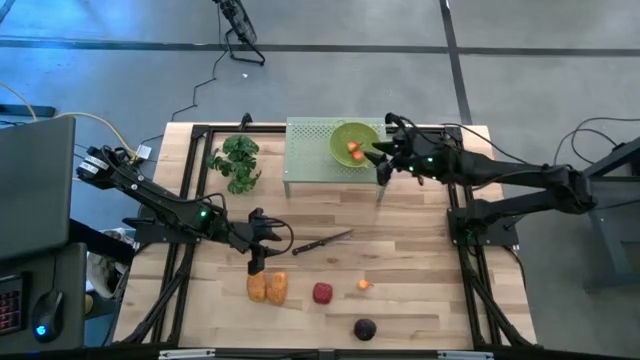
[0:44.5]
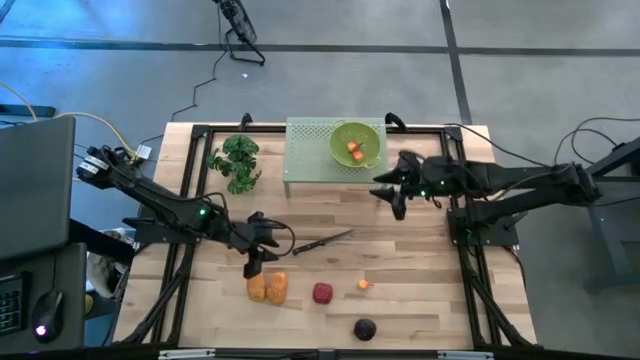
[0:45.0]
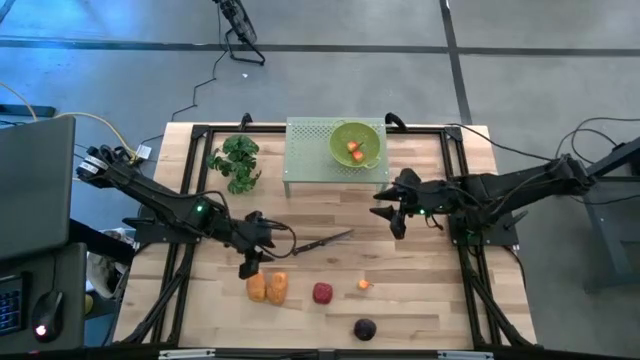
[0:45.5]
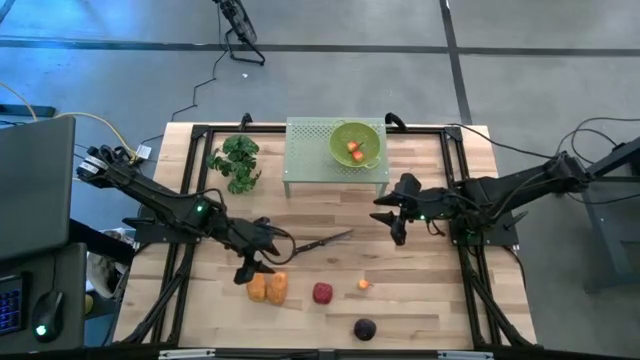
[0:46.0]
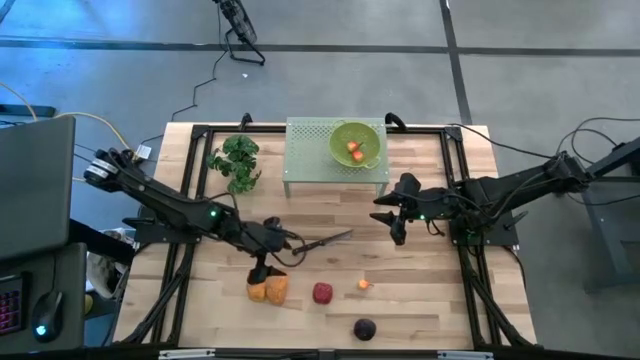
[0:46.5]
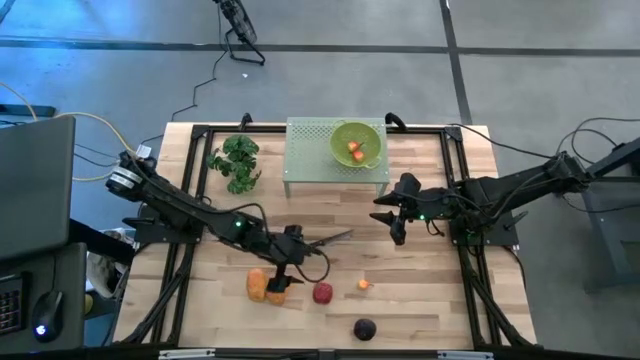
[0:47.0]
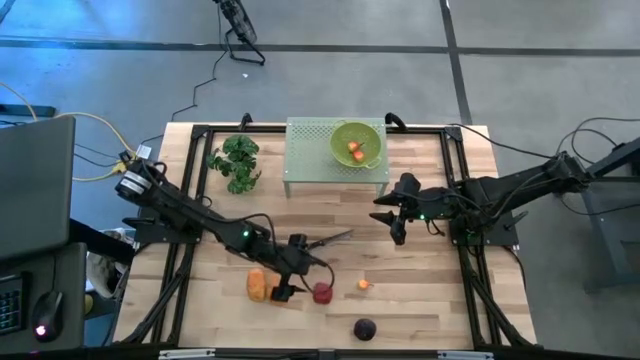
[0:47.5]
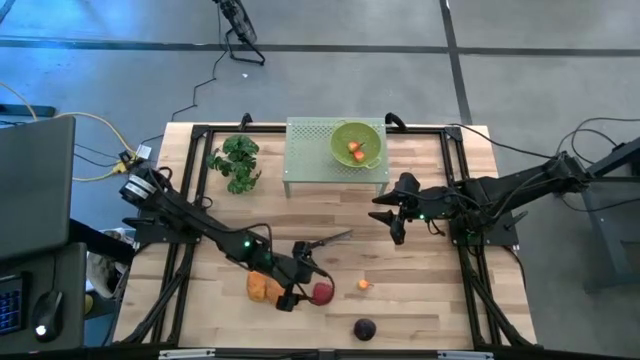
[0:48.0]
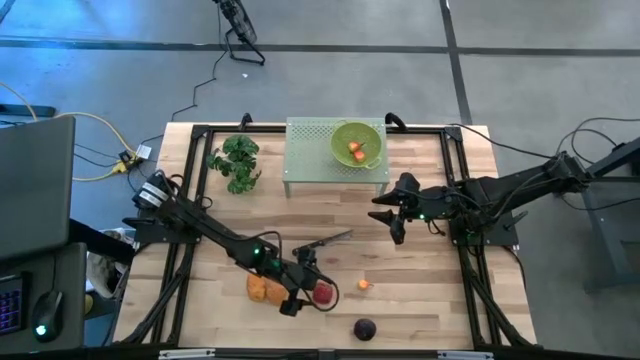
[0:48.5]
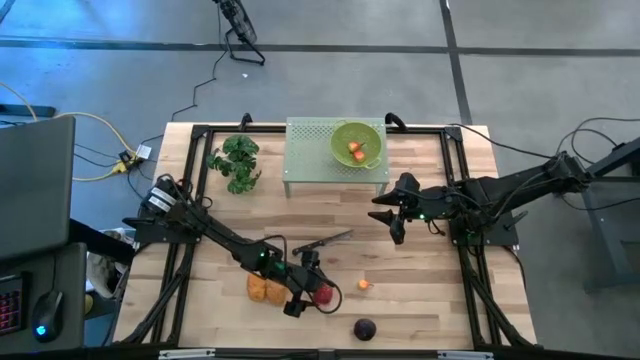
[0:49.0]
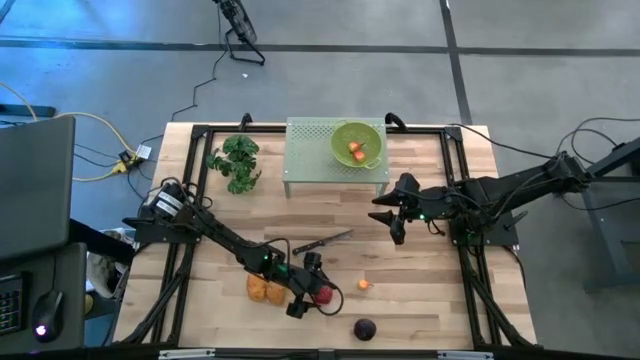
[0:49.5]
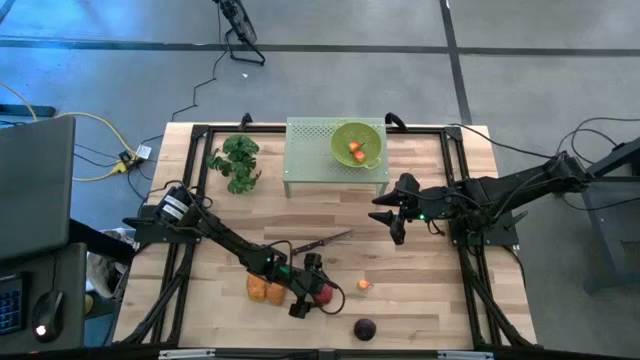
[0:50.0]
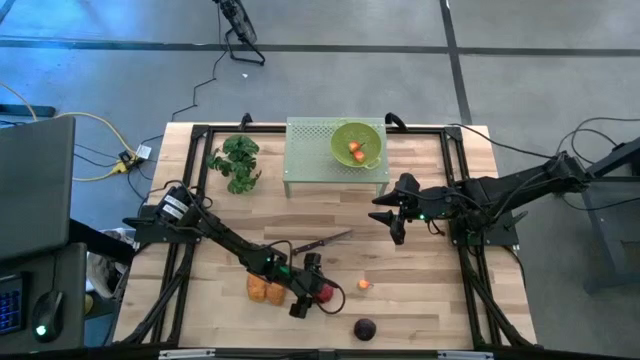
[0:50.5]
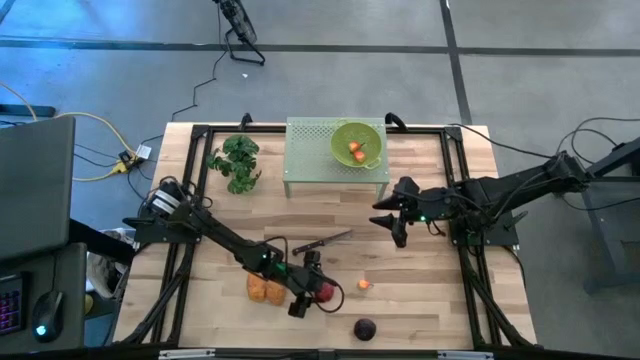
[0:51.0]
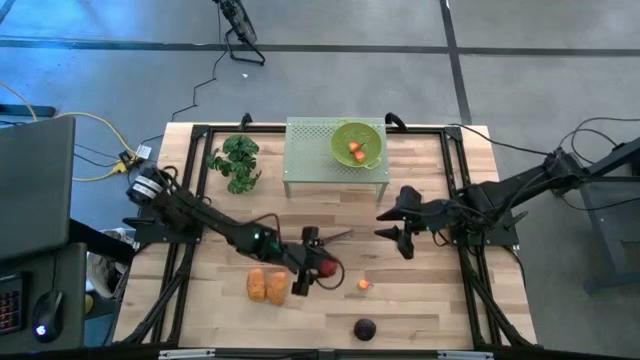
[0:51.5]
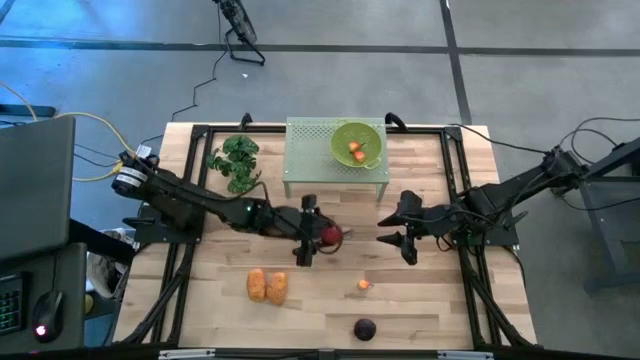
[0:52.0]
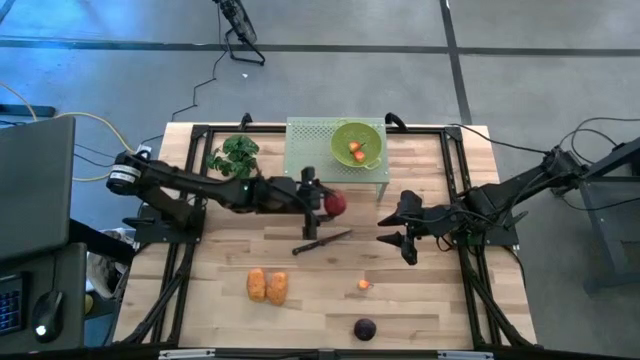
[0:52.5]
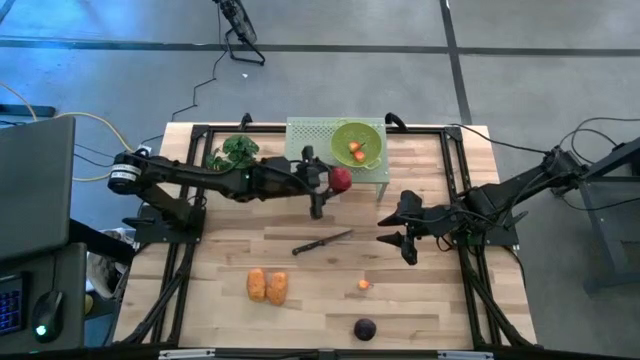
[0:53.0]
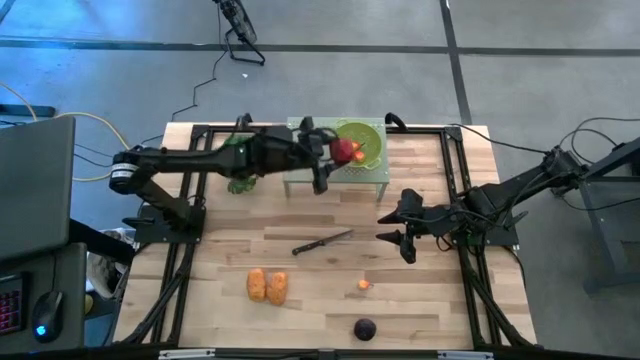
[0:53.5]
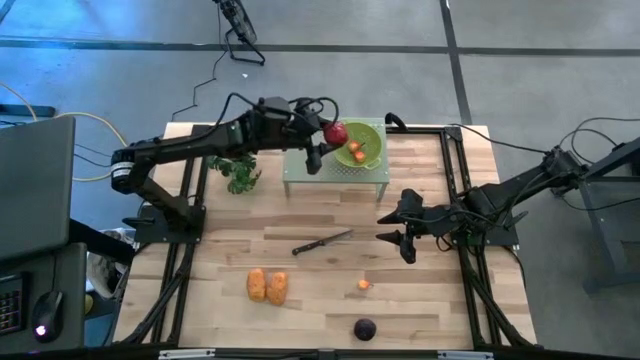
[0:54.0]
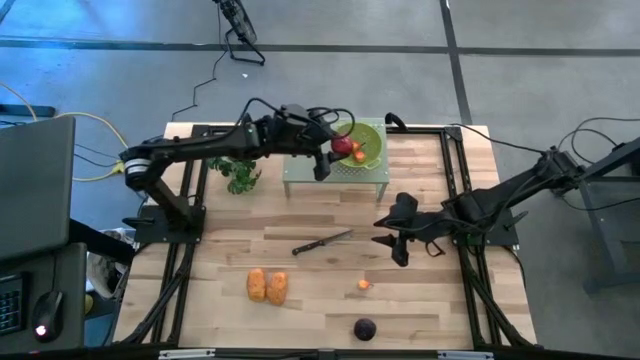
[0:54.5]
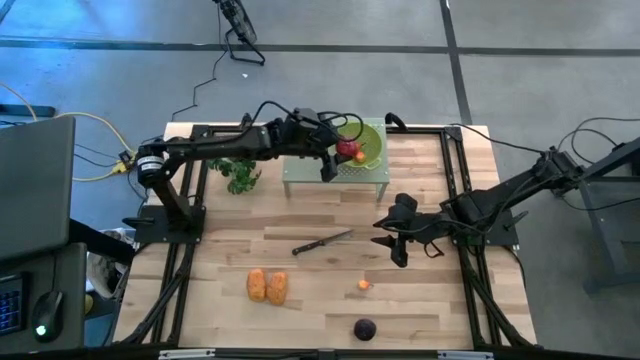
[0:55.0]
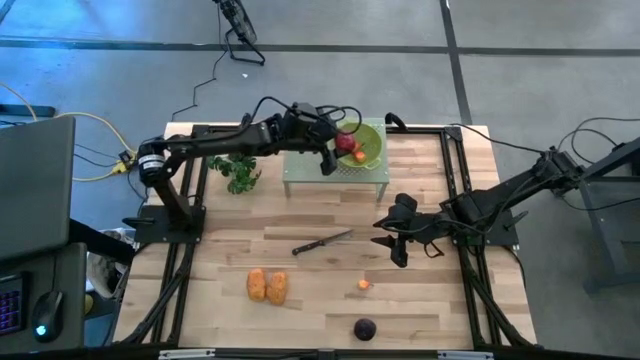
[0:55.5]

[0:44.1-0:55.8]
Task: Pick & Place Fruit
Put the red apple into the green strainer bowl on the shelf

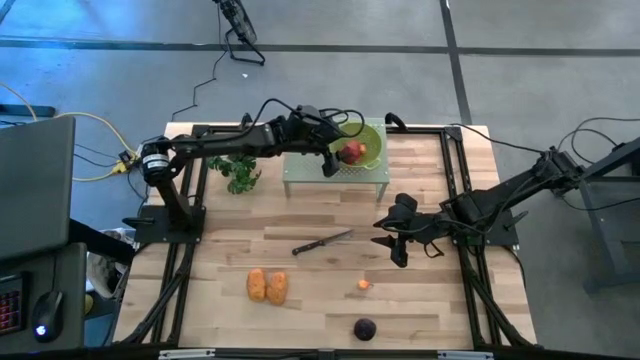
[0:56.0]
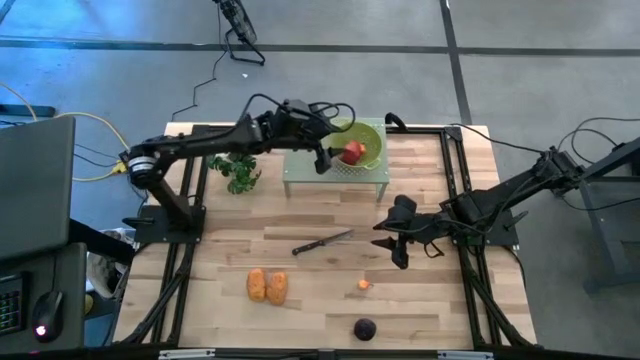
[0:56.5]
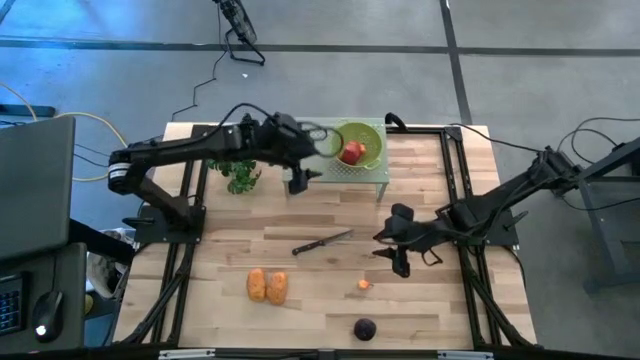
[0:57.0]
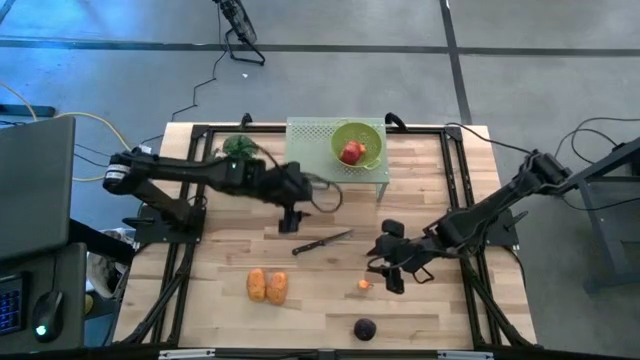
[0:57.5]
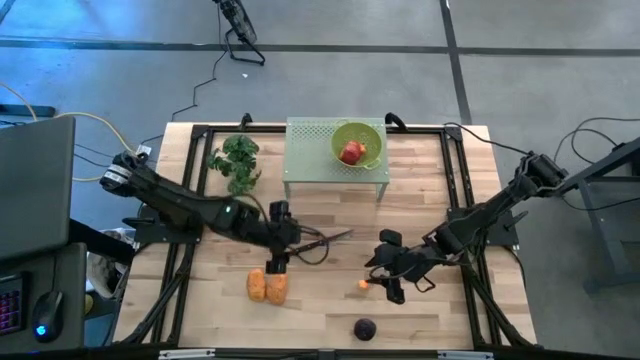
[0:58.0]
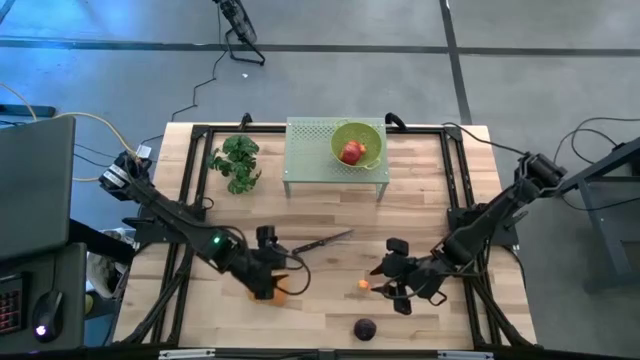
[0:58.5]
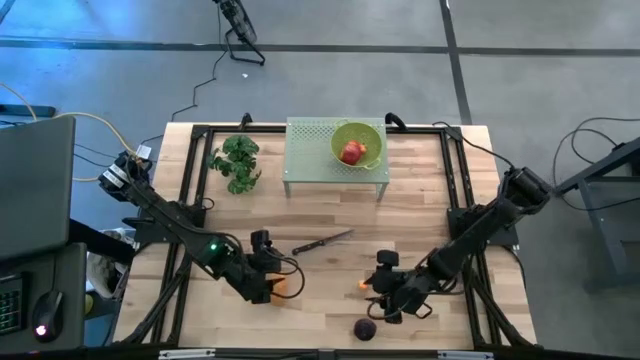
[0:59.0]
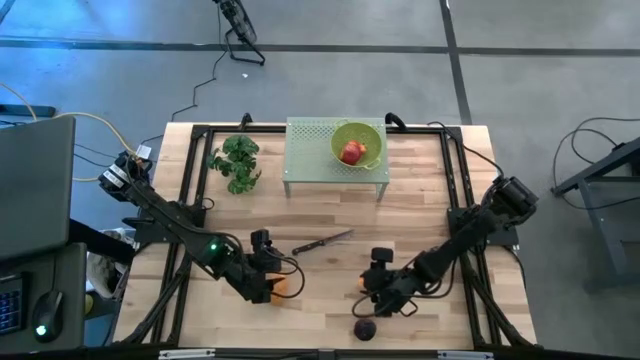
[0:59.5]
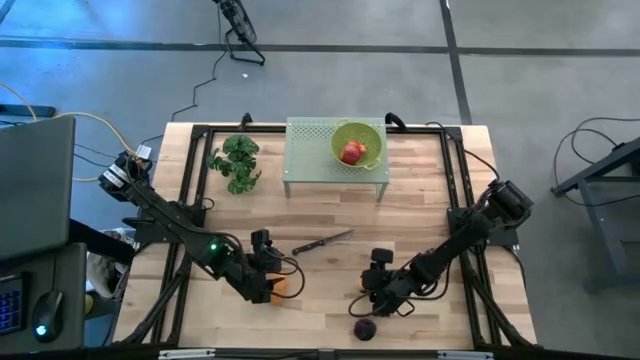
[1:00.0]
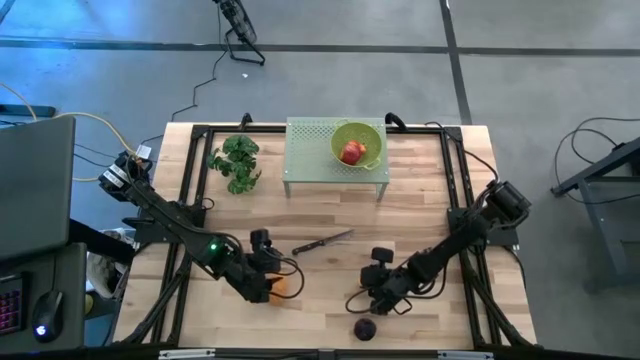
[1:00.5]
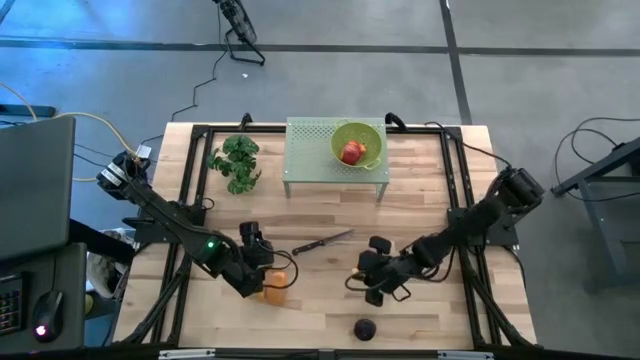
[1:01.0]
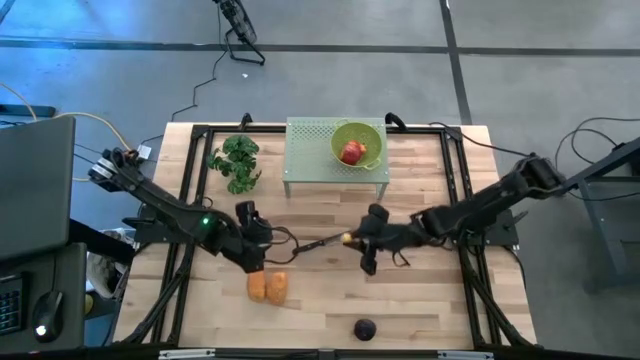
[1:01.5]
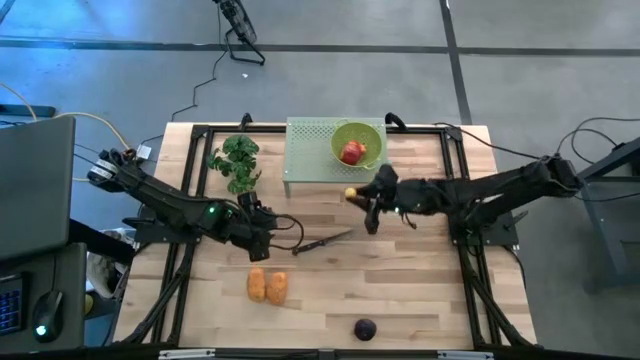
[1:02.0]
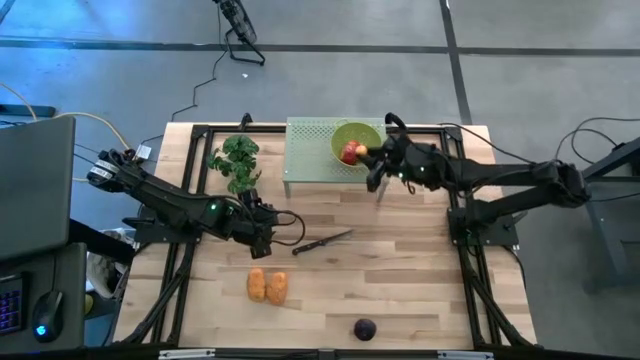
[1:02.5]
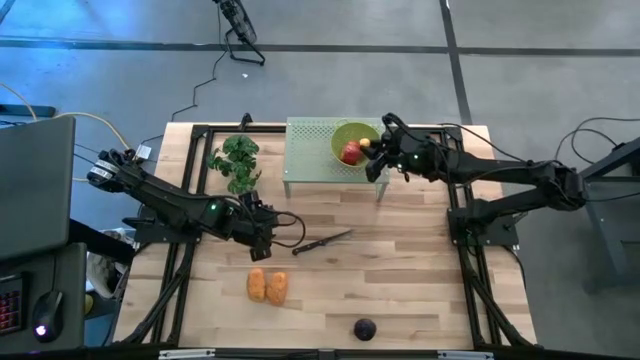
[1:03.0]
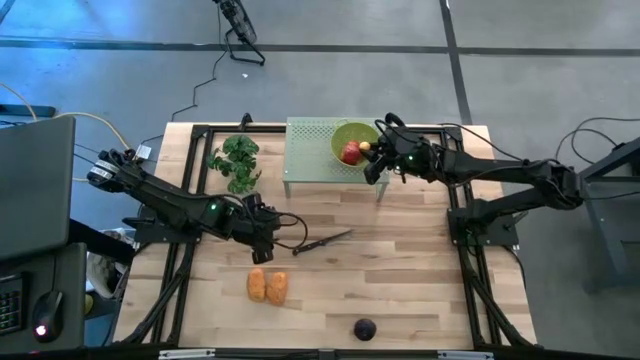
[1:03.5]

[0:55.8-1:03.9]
Put the orange peach into the green strainer bowl on the shelf

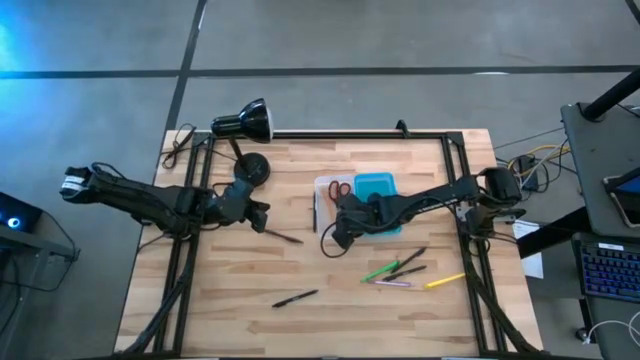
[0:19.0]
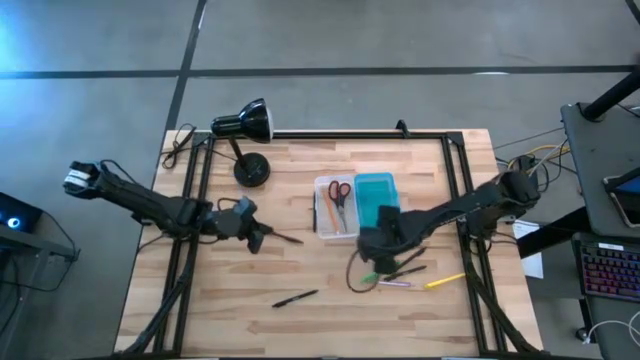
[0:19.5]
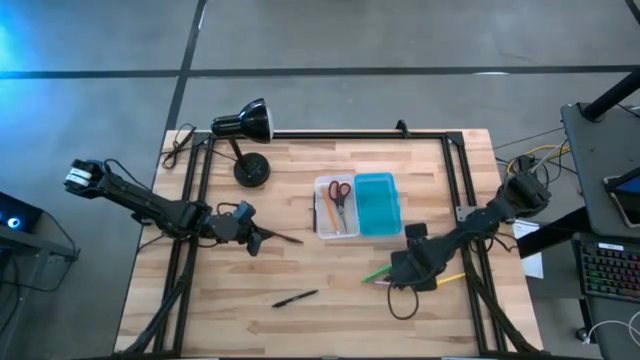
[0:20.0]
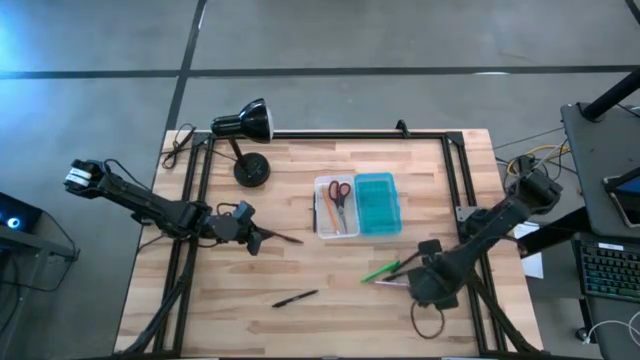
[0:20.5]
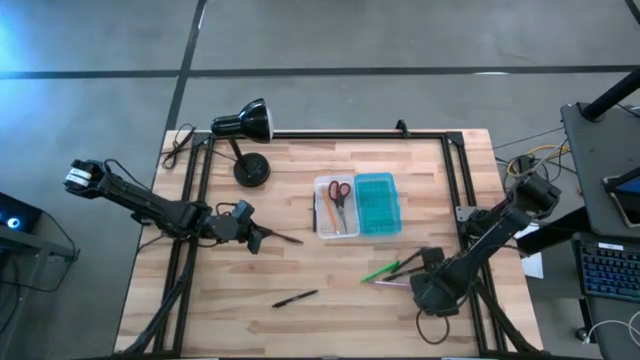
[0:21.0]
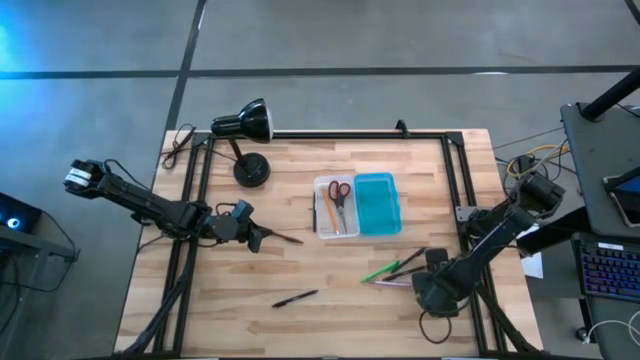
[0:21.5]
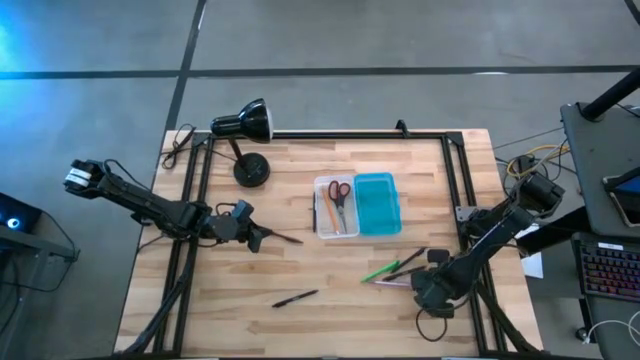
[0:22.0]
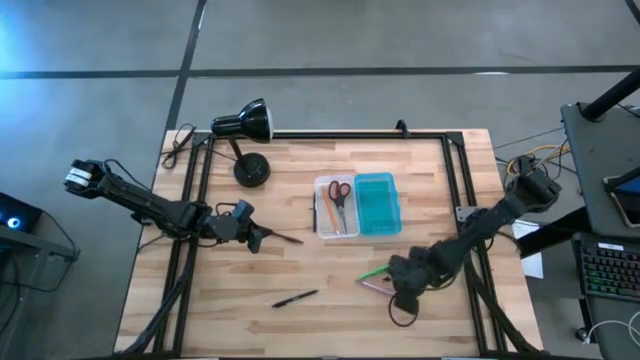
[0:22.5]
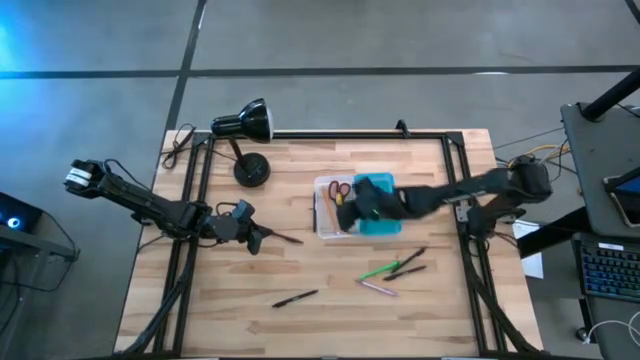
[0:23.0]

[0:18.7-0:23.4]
Task: Pick & place school supplies into a supply box
Put the yellow pen into the blue supply box
